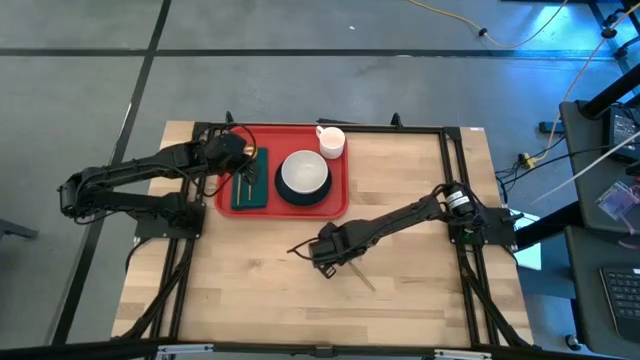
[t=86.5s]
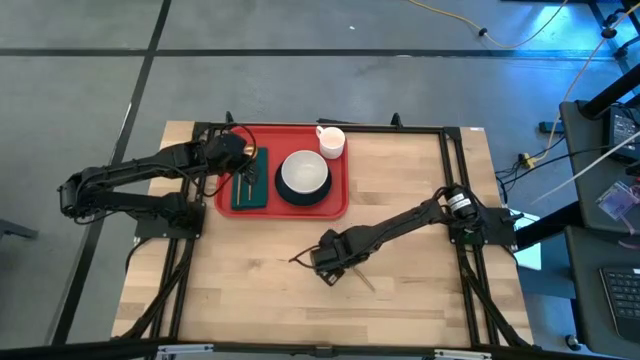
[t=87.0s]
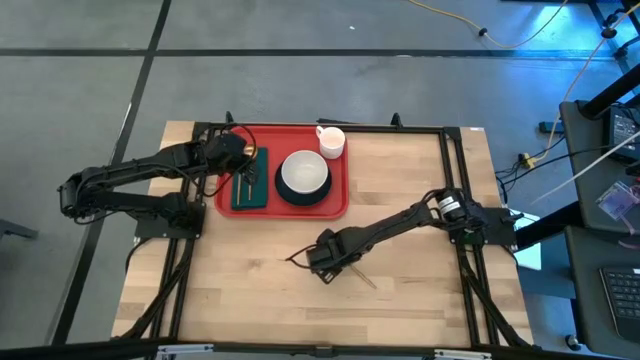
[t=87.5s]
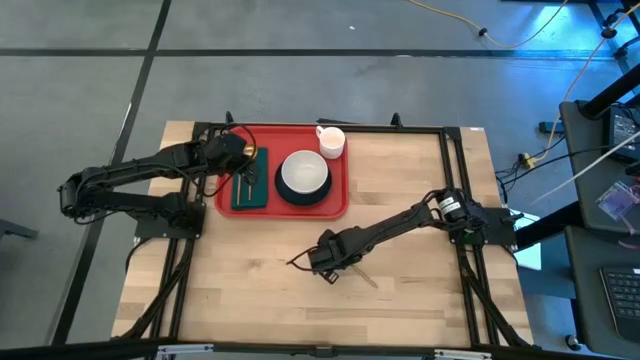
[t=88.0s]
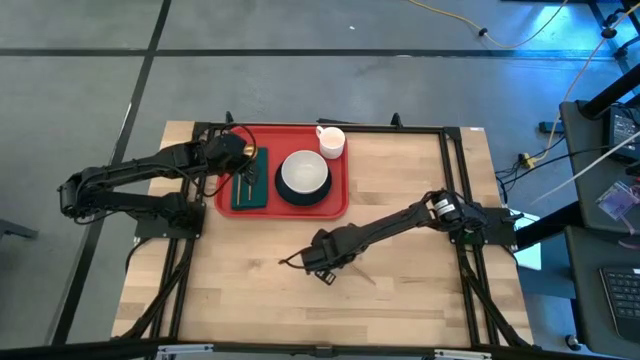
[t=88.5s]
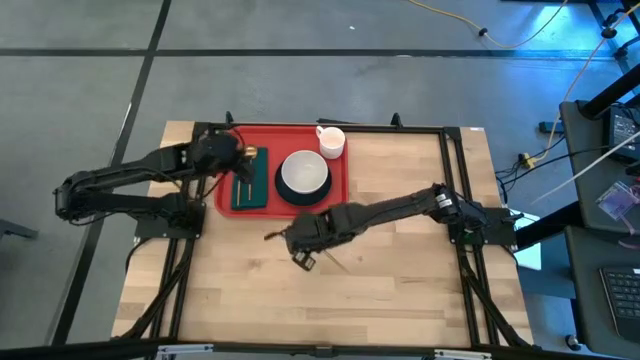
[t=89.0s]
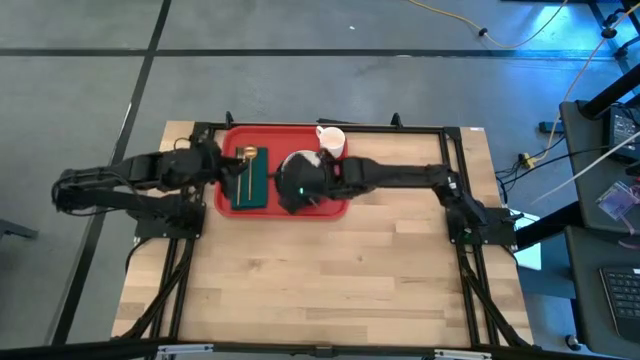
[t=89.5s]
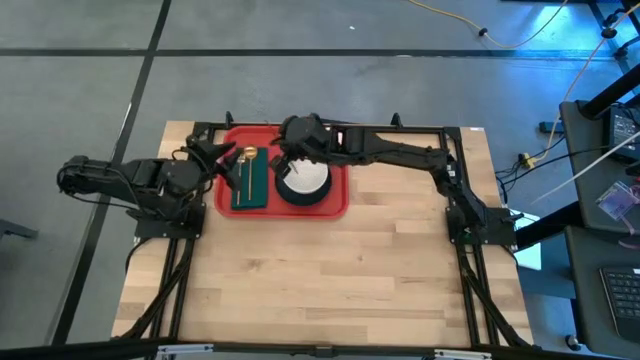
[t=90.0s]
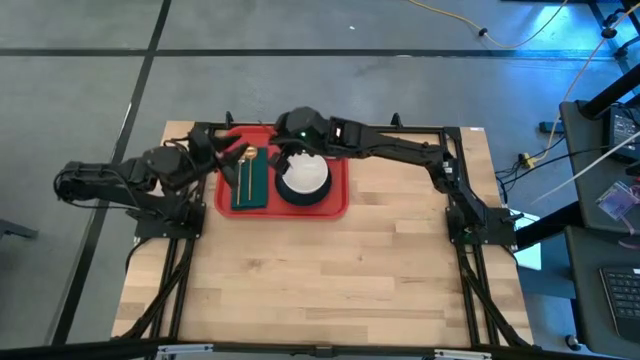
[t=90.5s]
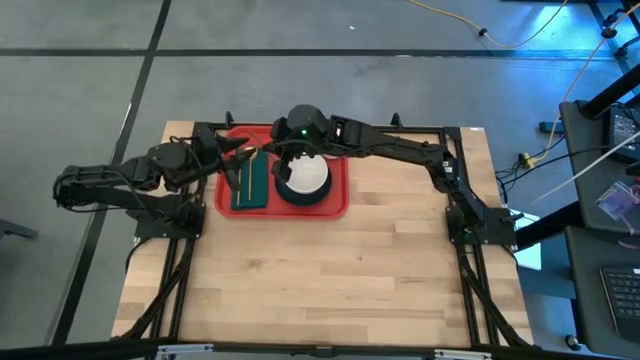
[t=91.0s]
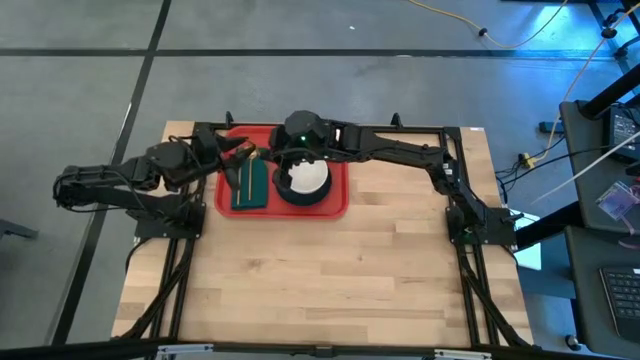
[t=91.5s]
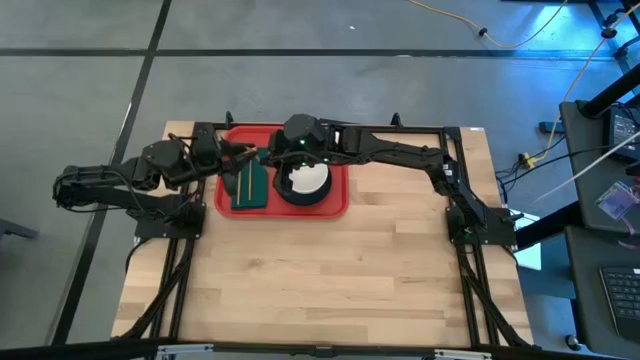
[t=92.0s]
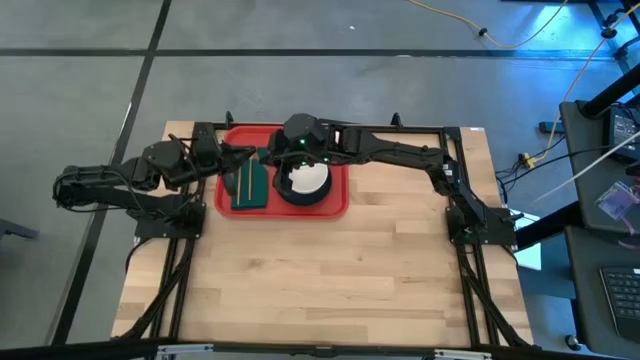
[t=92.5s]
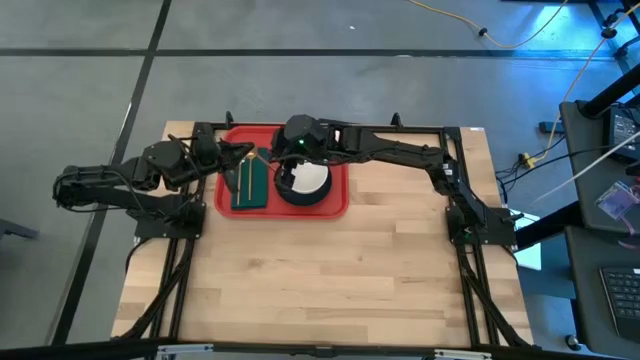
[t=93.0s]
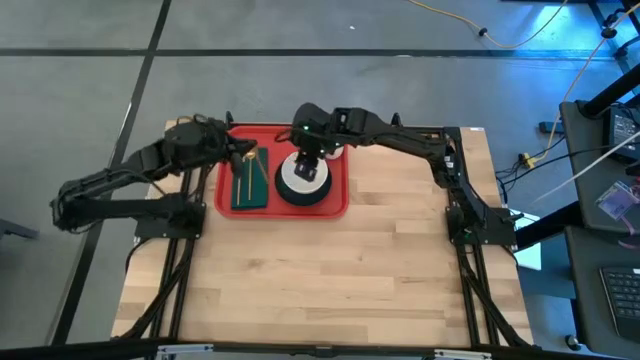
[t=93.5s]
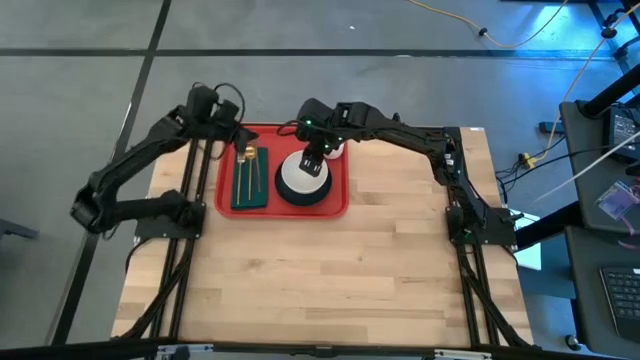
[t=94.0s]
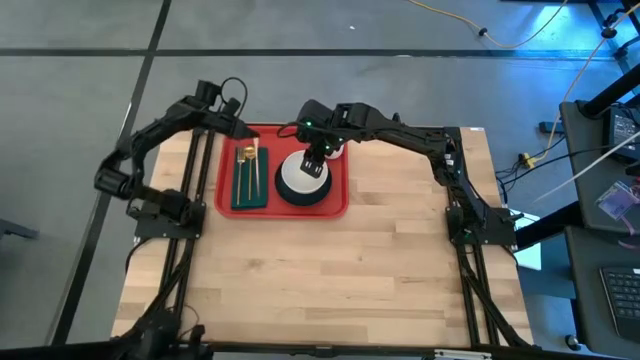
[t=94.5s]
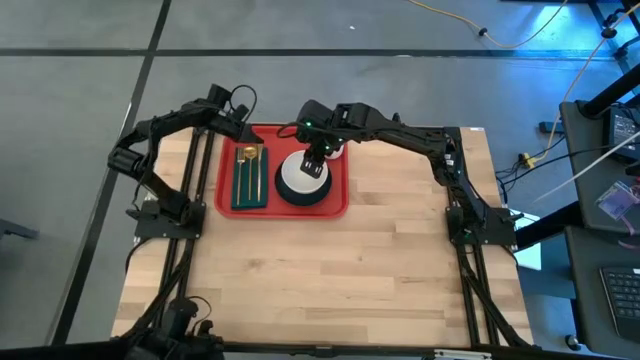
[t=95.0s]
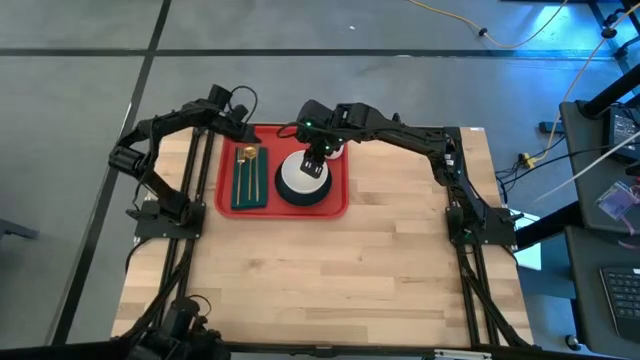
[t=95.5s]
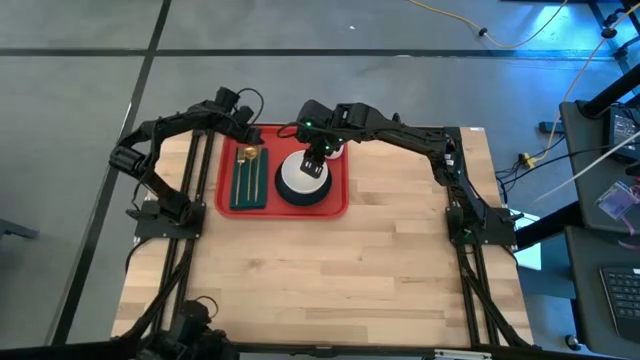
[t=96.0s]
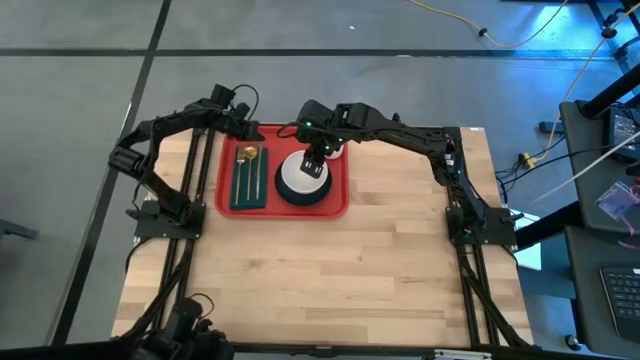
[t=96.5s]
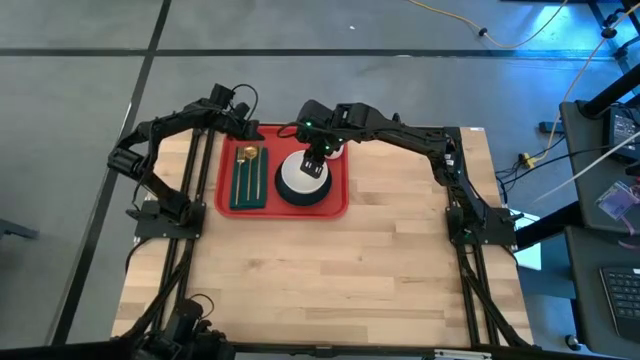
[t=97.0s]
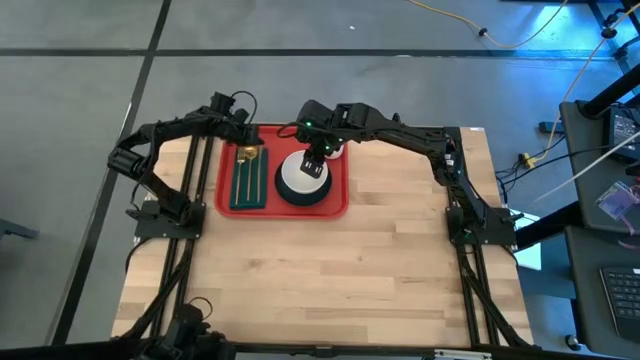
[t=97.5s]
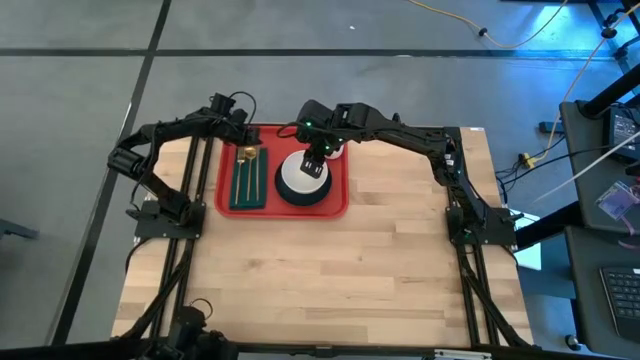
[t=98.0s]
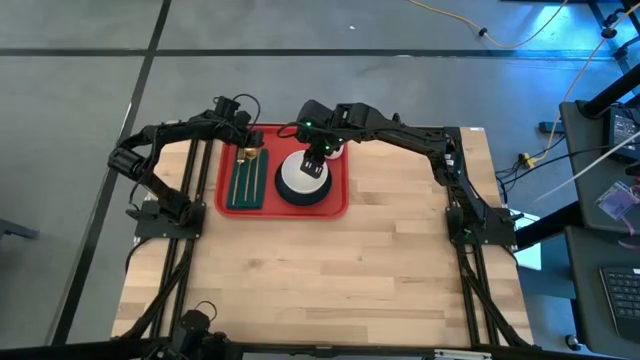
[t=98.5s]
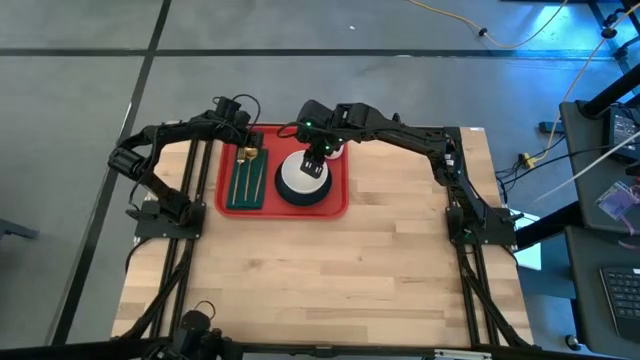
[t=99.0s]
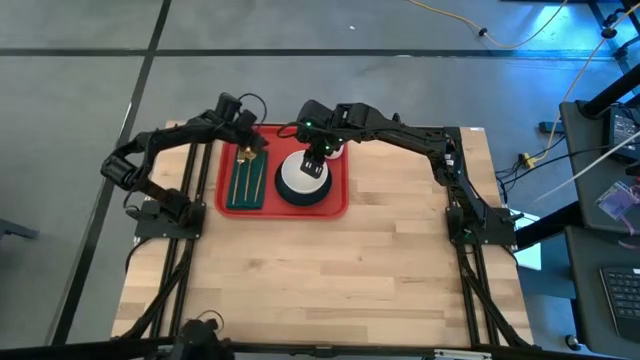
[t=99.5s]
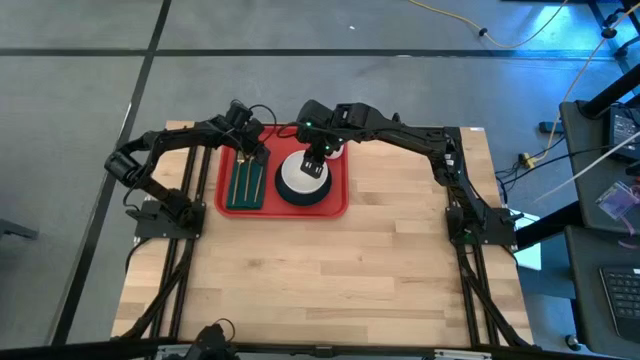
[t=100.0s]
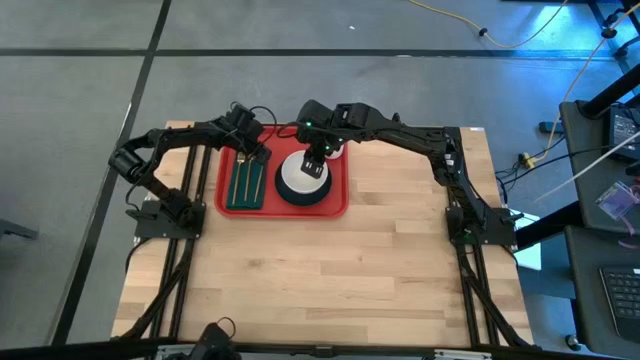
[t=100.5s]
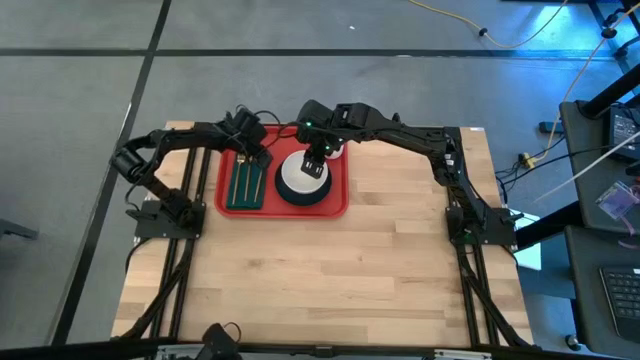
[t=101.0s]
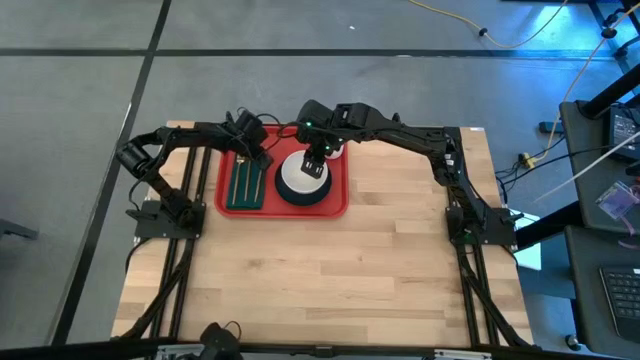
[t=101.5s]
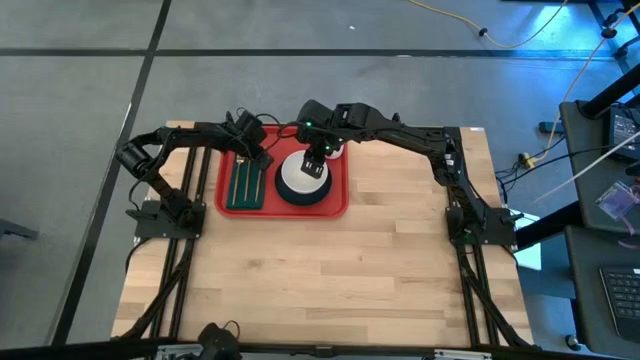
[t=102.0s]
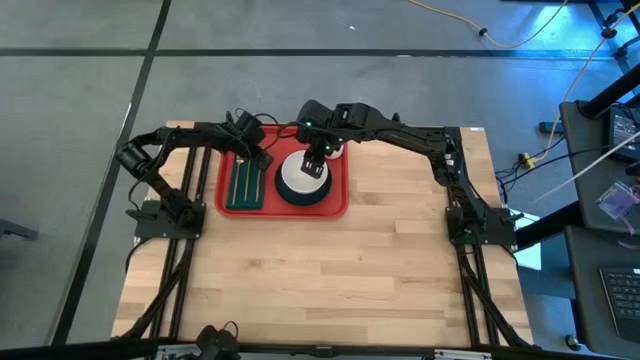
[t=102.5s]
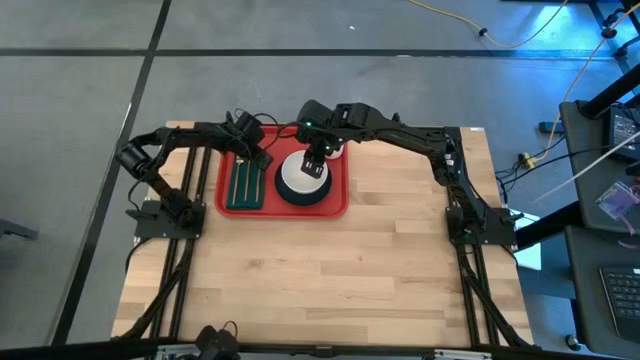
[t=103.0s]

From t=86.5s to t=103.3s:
Task: Set up tray
Put the gold knife on the green napkin to the right of the gold spoon

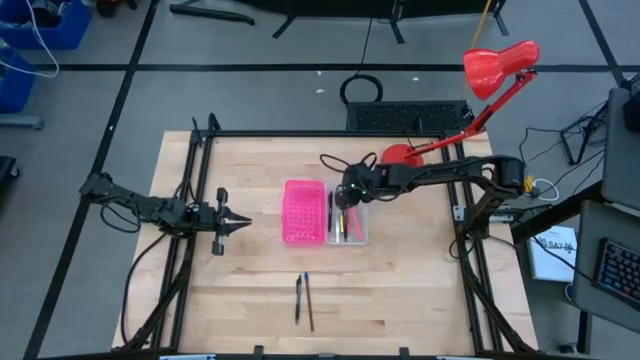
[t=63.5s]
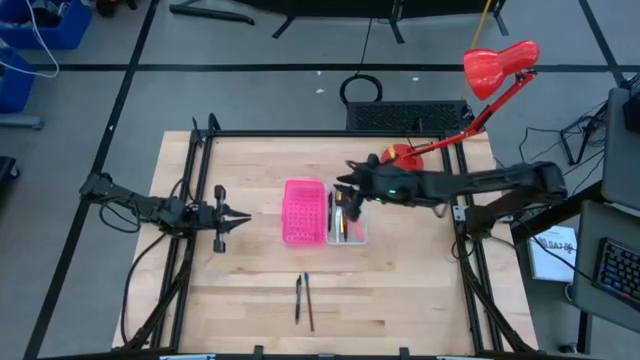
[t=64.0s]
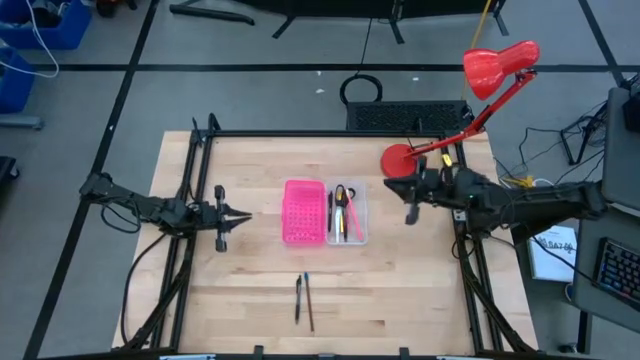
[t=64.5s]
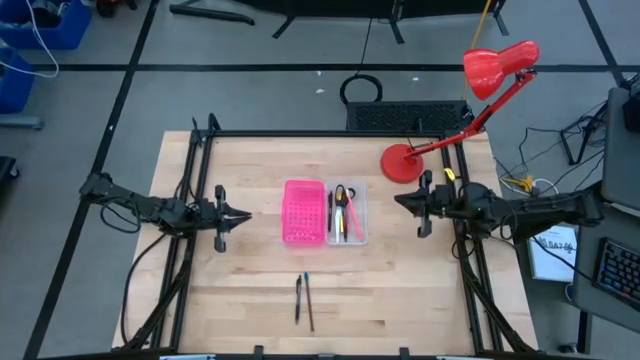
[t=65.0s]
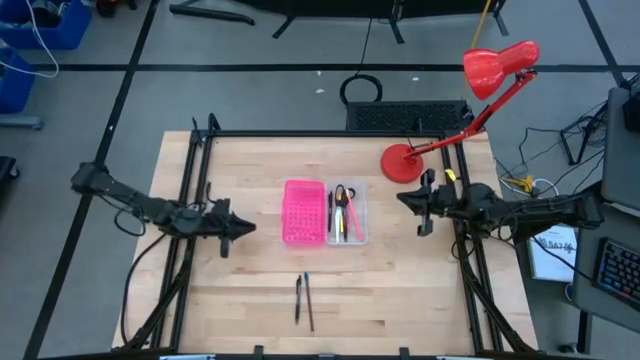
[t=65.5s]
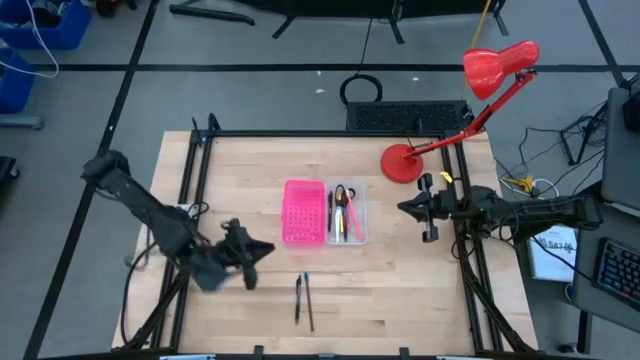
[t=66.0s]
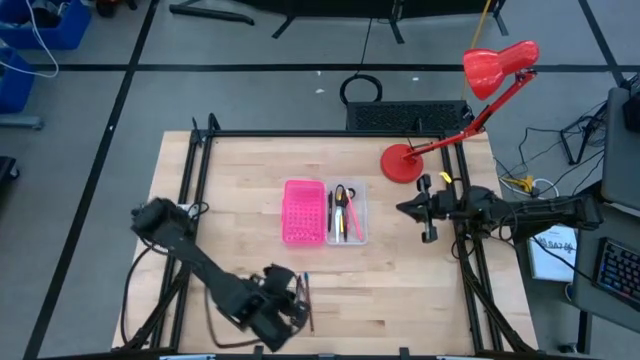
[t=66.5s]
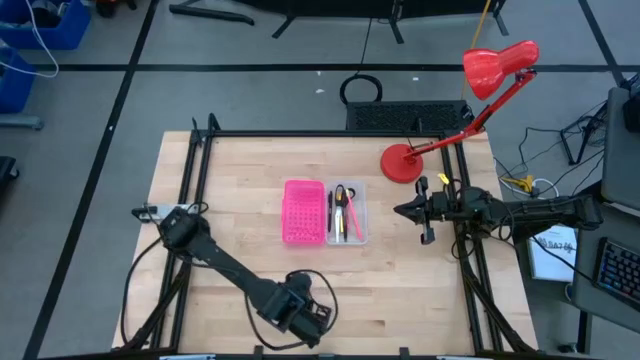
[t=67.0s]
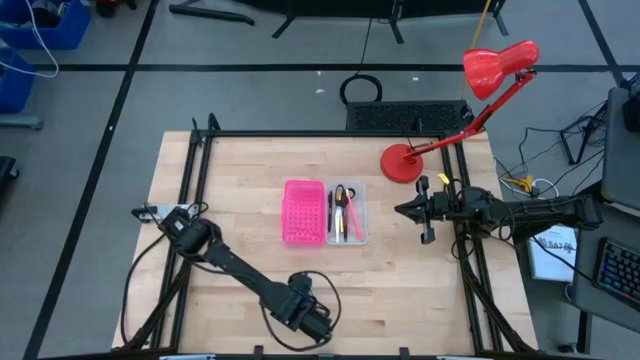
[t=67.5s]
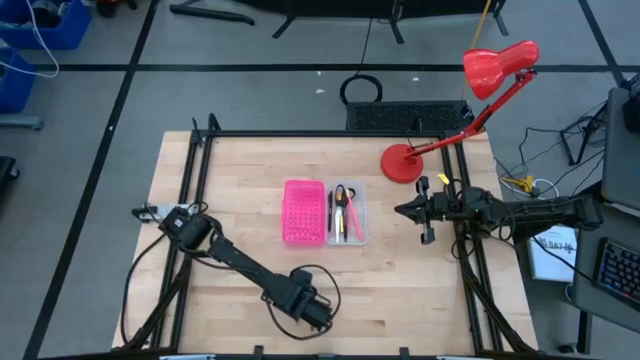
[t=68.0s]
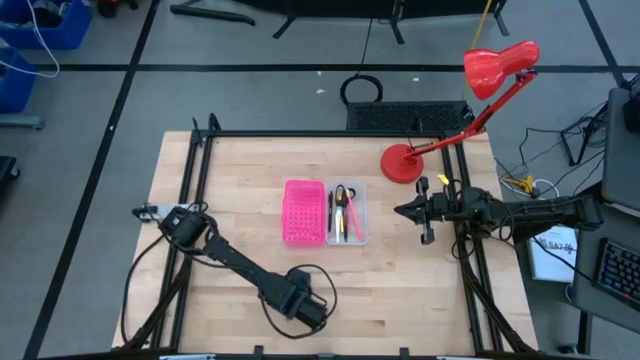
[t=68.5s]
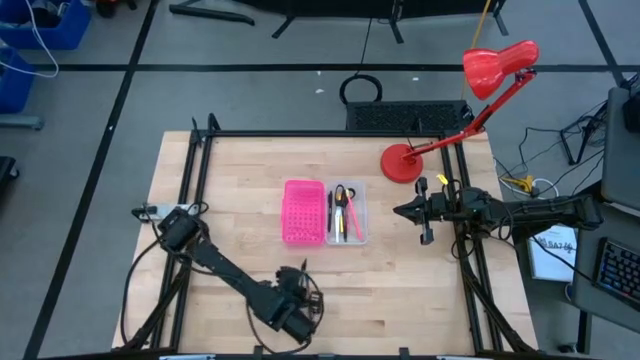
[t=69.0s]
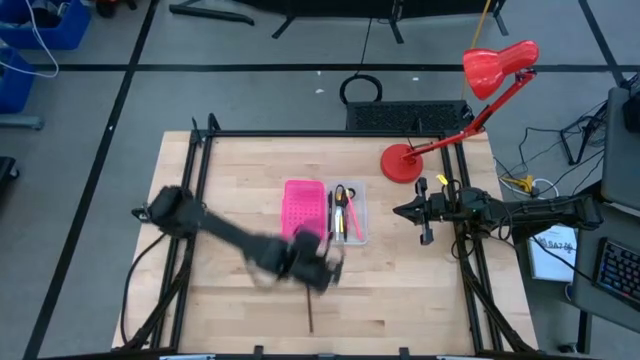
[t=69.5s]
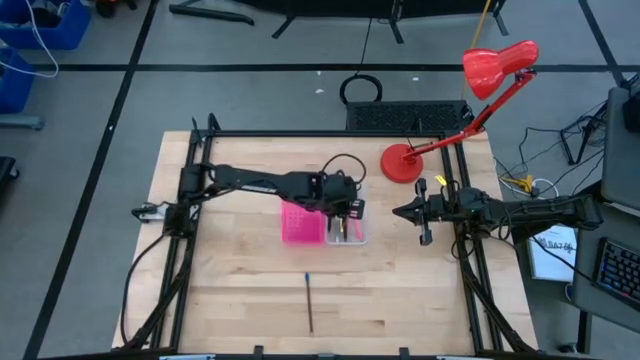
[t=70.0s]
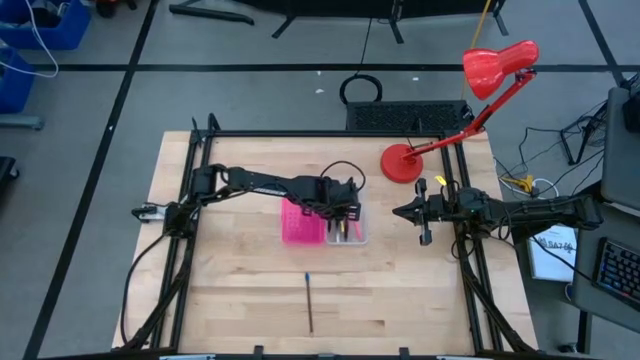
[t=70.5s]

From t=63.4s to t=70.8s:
Task: Pick & place school supplies into a supply box
Put the transparent black pen into the supply box
